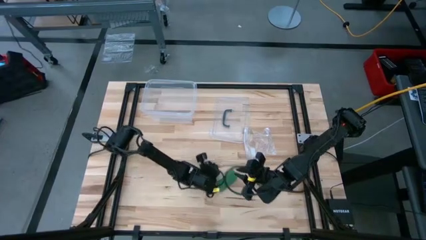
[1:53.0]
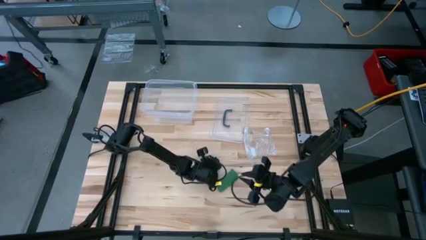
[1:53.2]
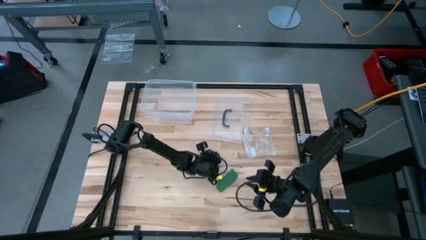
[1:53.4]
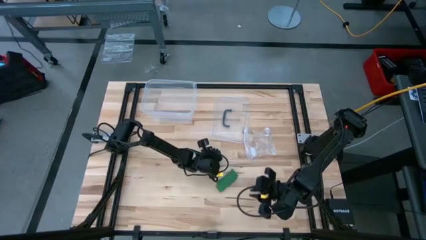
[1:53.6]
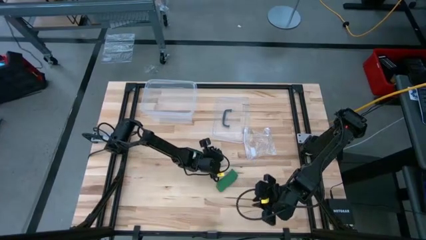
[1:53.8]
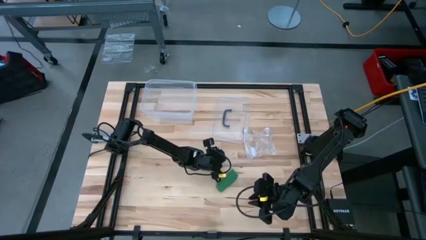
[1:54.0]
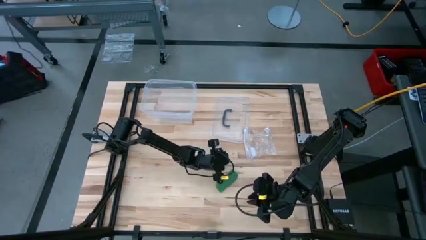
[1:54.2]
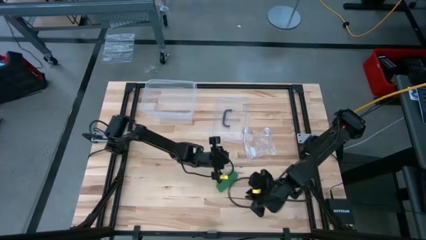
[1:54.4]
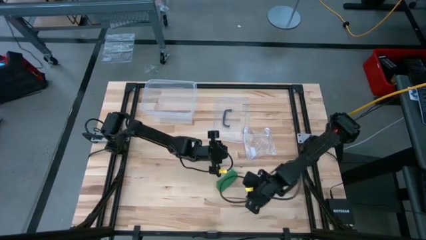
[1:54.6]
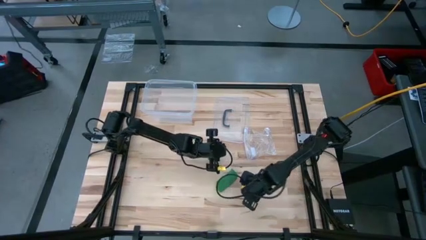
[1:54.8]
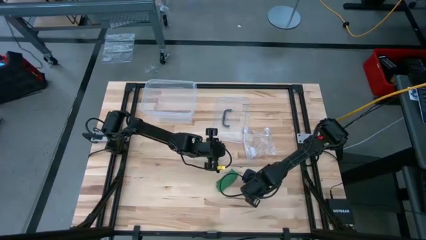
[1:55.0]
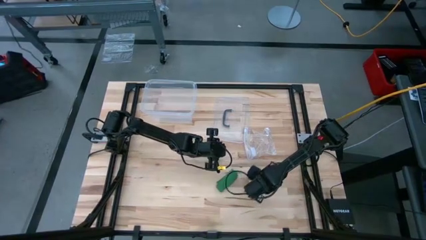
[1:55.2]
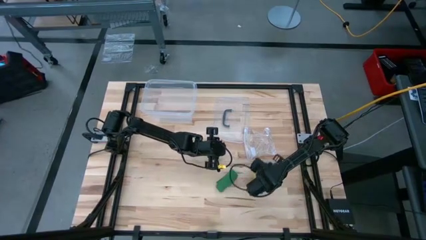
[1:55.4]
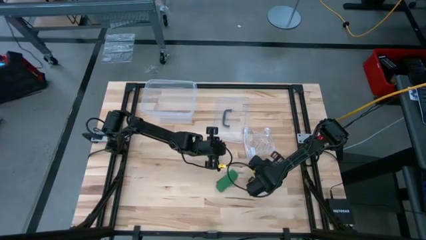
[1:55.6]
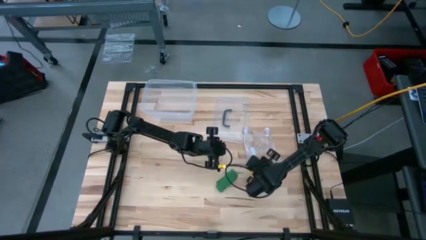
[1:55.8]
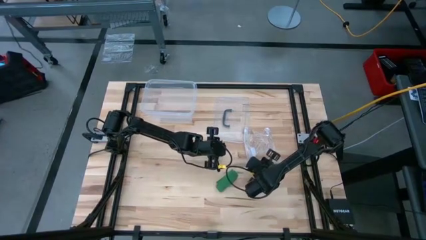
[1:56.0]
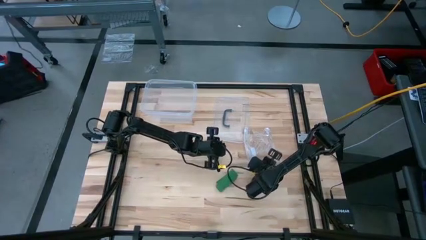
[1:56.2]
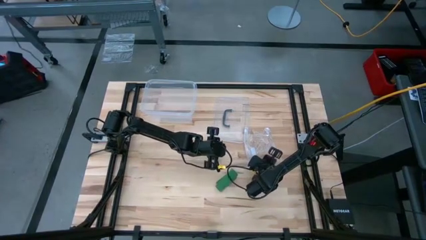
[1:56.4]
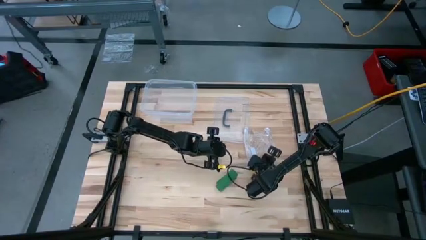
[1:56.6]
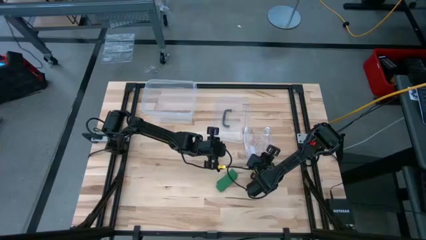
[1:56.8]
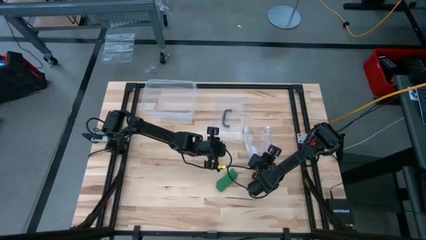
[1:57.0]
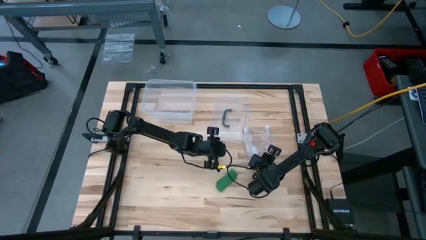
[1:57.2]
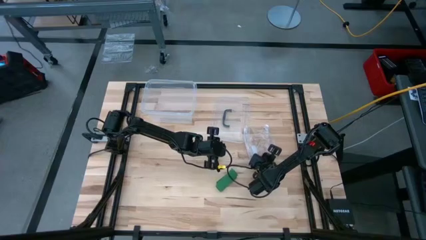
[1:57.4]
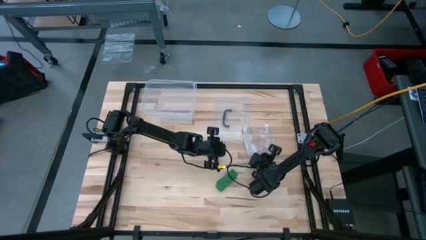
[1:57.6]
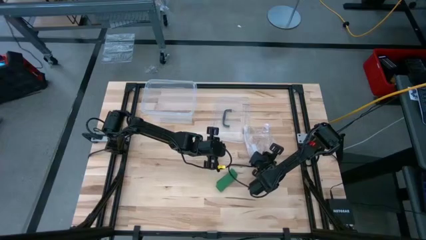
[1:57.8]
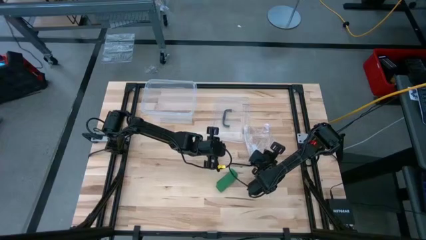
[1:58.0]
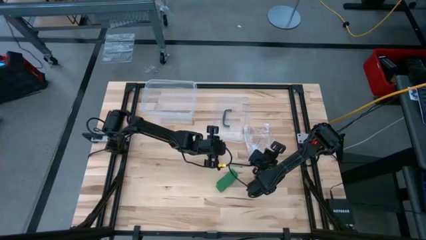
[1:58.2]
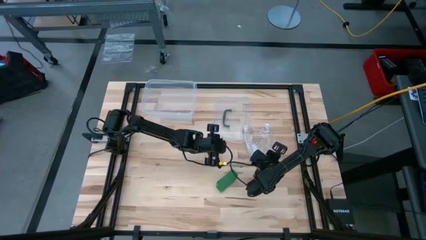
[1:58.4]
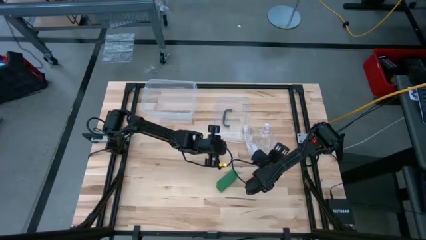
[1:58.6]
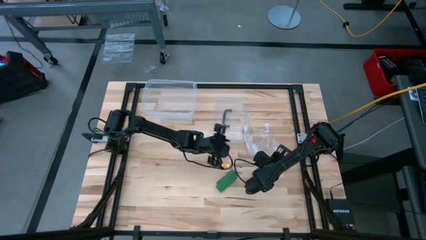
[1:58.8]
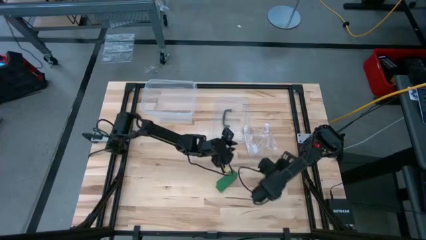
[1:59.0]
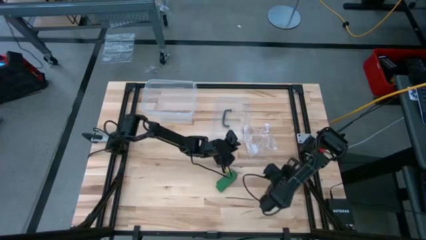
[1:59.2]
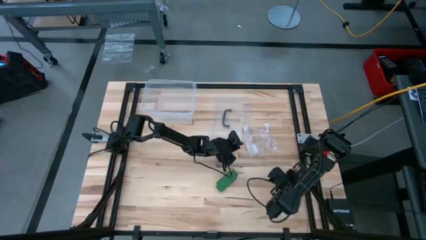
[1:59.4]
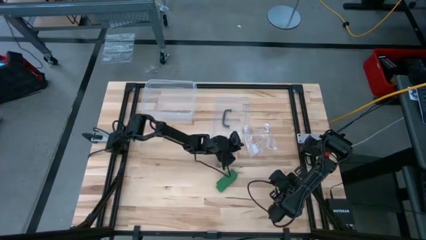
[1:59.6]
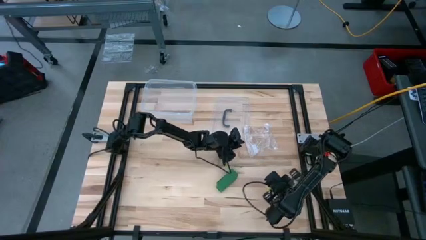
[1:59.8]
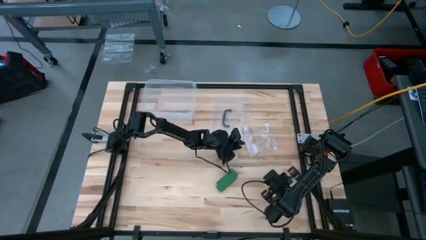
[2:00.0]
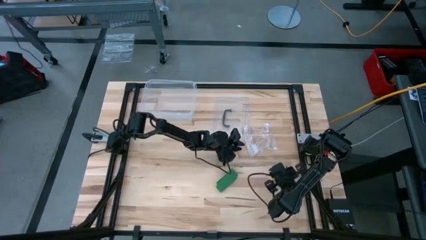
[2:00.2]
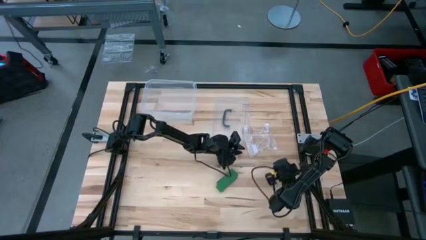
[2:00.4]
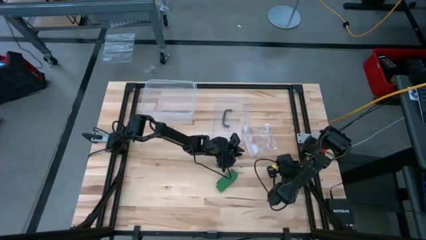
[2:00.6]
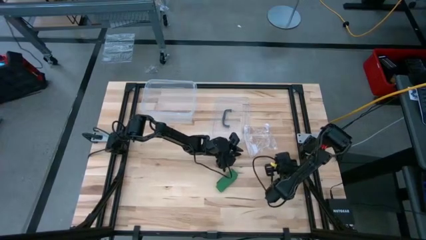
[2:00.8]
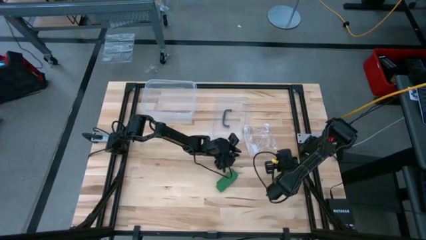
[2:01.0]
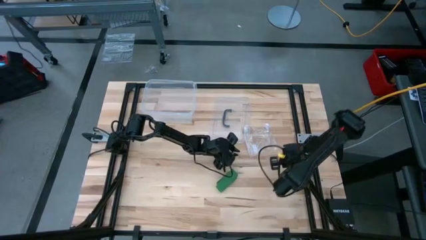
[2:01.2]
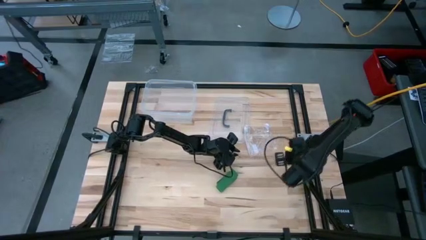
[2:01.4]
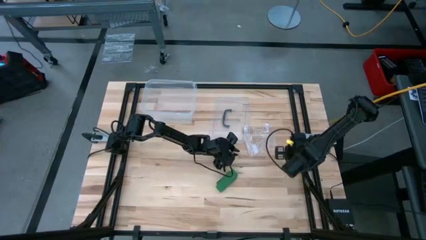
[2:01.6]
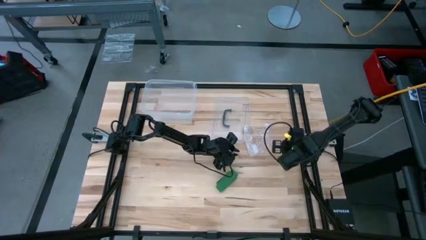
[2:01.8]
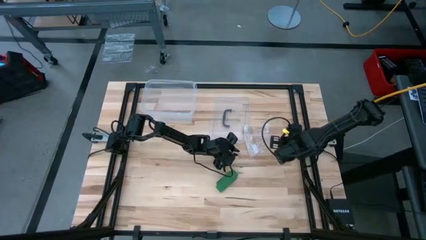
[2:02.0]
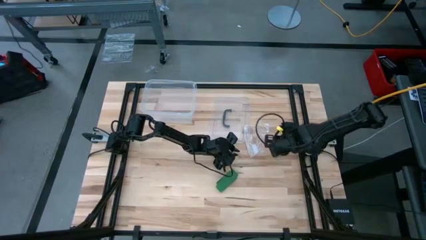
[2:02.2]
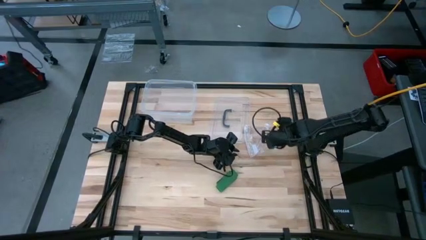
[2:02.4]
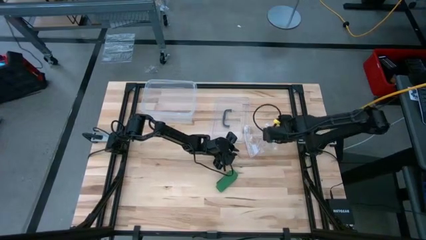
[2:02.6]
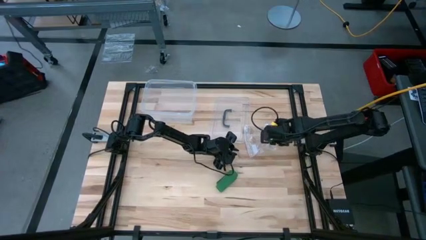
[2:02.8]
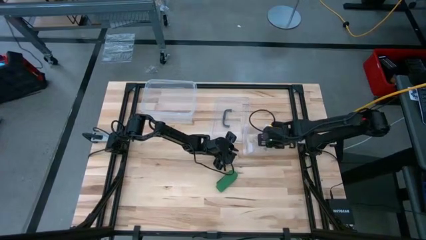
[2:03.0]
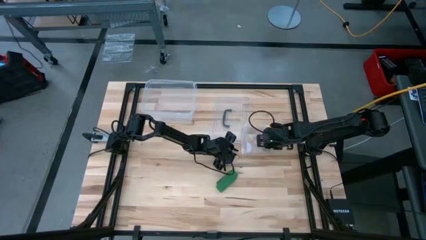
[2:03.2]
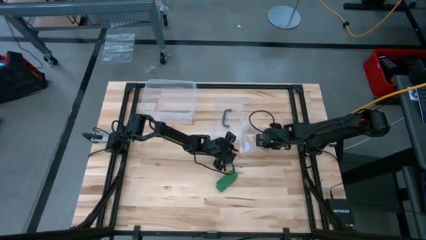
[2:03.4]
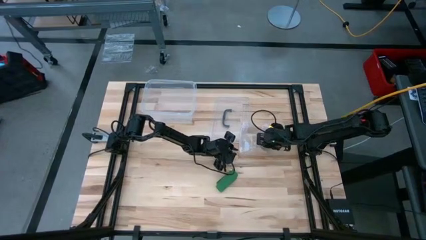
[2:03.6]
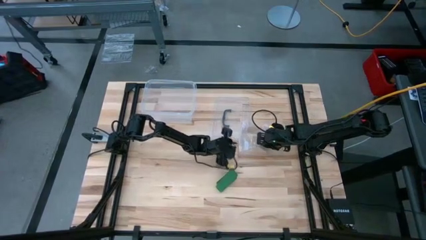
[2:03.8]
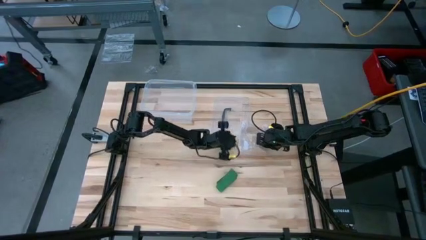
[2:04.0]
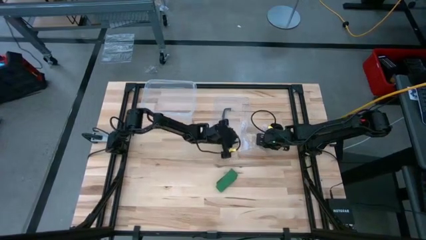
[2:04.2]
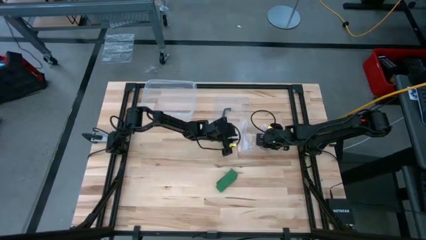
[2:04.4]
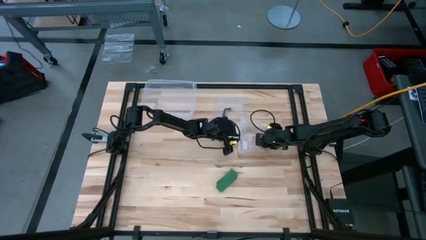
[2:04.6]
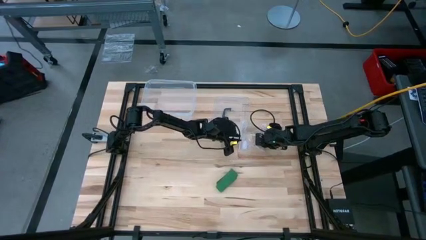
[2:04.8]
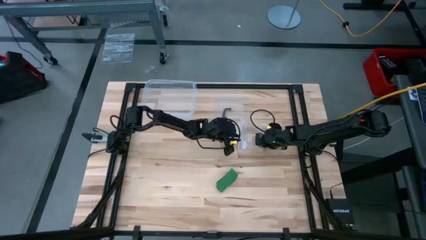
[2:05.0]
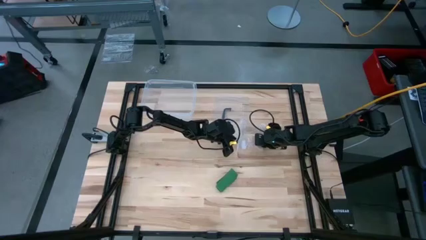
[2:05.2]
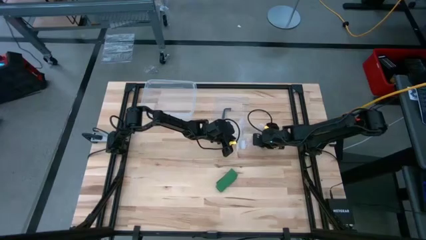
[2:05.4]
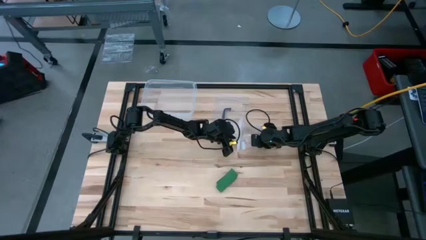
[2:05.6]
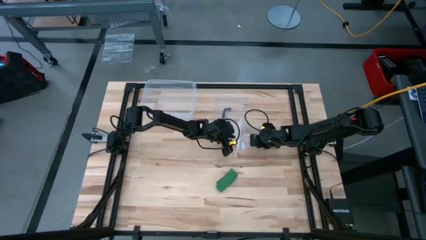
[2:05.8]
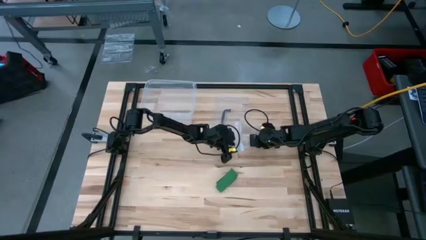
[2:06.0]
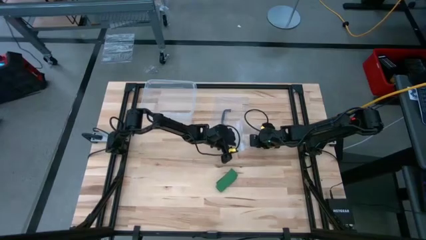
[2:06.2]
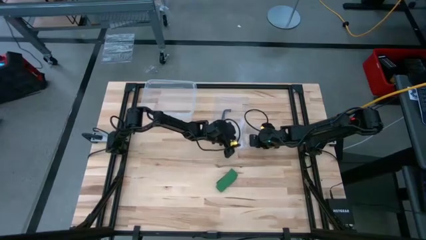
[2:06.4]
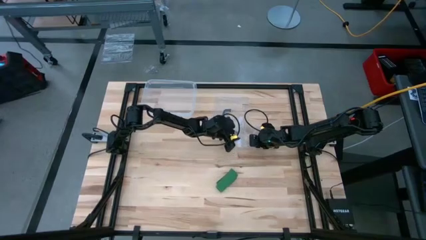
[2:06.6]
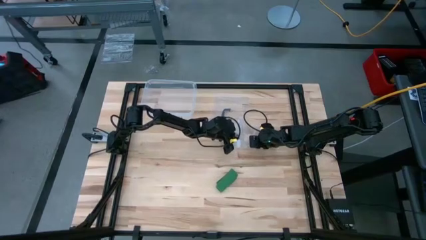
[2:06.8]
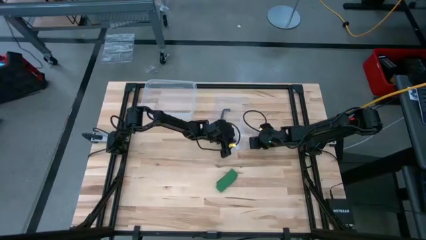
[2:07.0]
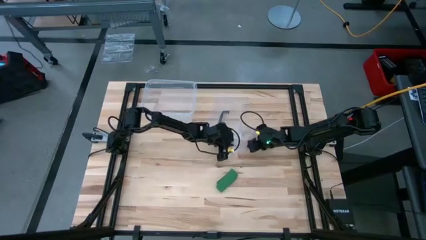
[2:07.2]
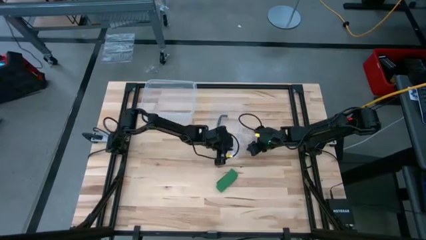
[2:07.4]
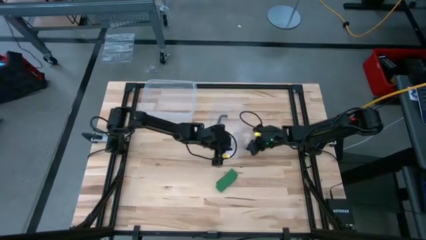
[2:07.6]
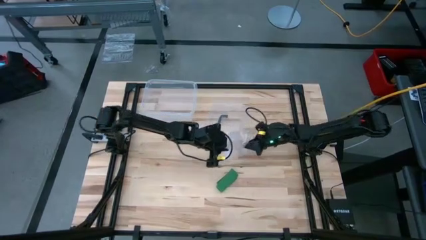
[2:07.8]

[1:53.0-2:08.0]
Task: Roll bandage
Open the transparent zip bag
